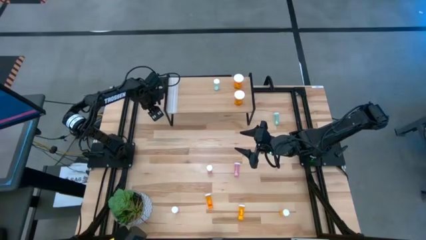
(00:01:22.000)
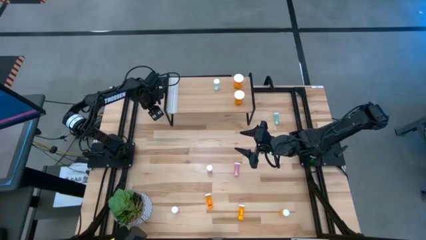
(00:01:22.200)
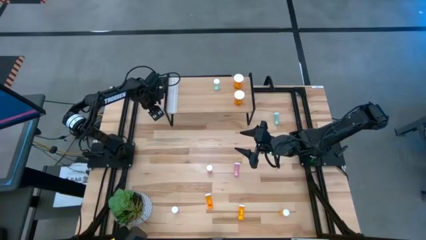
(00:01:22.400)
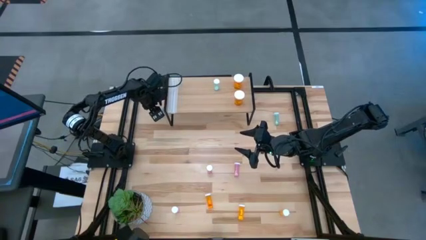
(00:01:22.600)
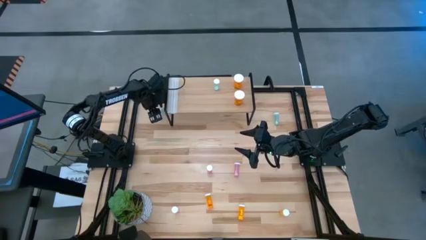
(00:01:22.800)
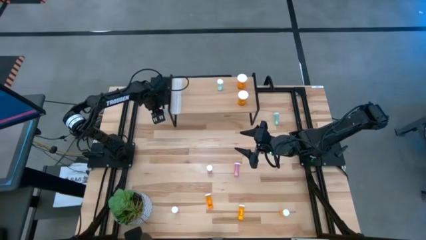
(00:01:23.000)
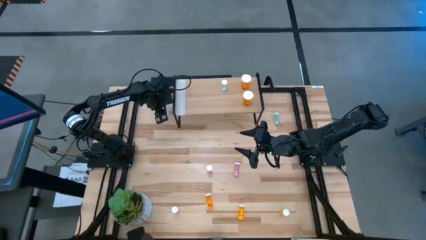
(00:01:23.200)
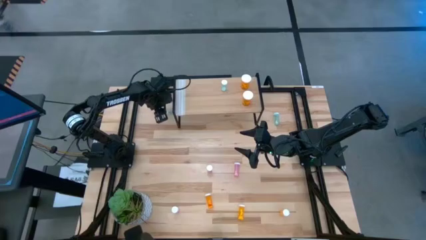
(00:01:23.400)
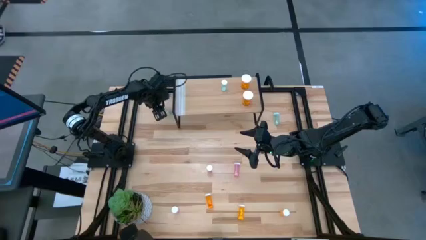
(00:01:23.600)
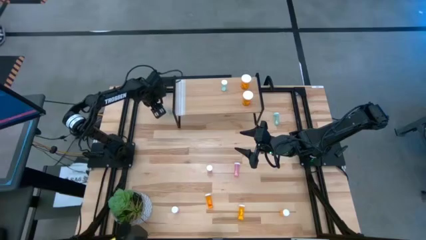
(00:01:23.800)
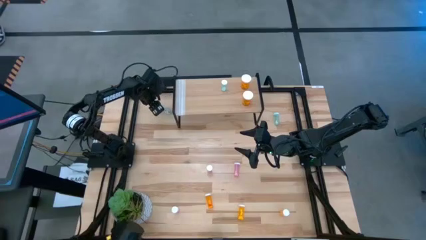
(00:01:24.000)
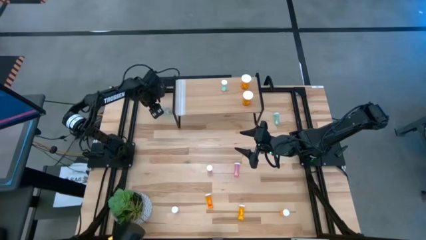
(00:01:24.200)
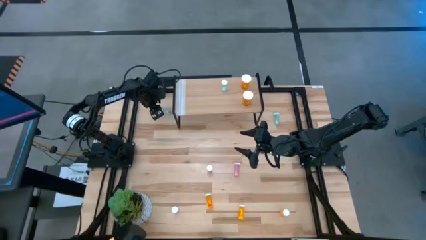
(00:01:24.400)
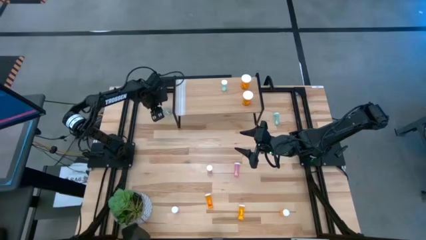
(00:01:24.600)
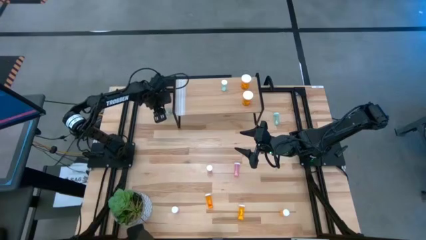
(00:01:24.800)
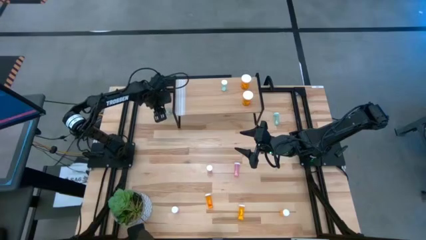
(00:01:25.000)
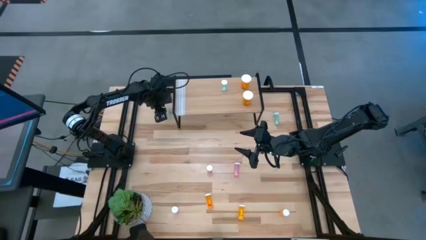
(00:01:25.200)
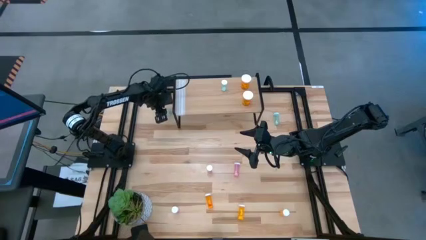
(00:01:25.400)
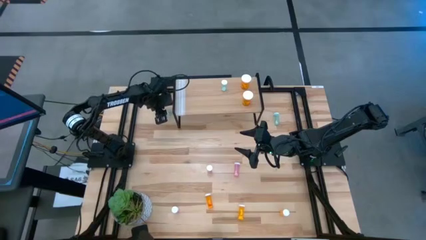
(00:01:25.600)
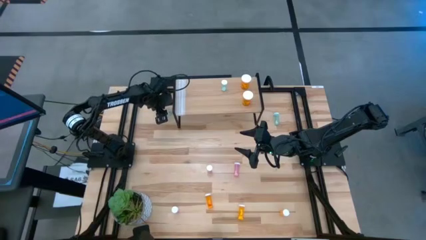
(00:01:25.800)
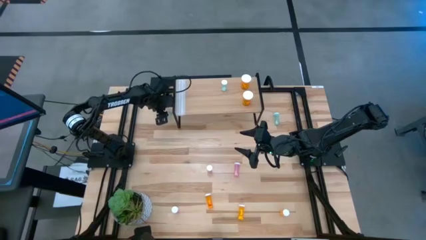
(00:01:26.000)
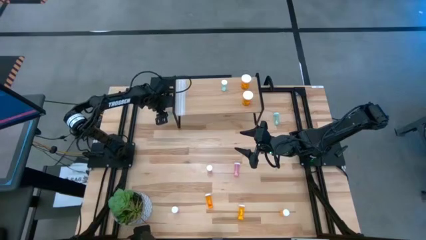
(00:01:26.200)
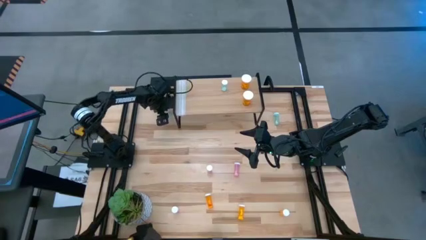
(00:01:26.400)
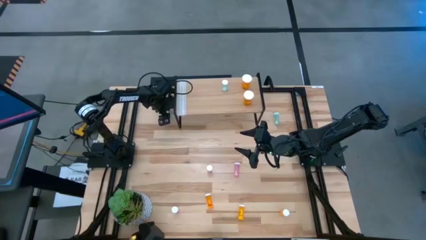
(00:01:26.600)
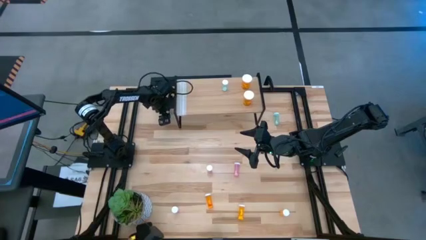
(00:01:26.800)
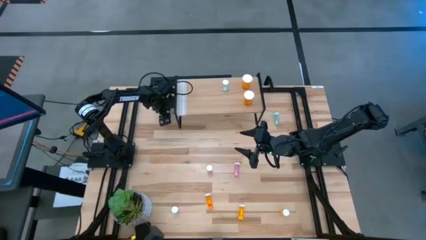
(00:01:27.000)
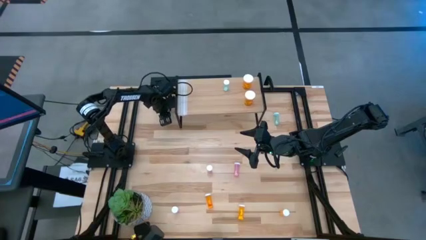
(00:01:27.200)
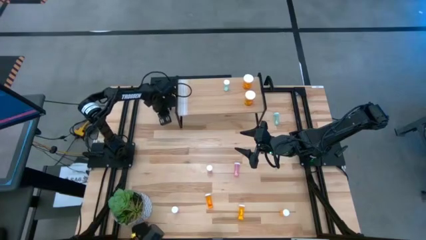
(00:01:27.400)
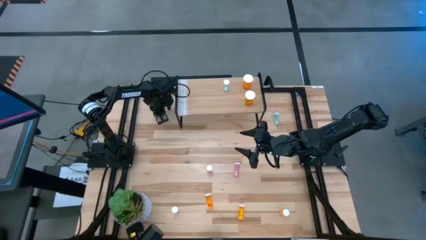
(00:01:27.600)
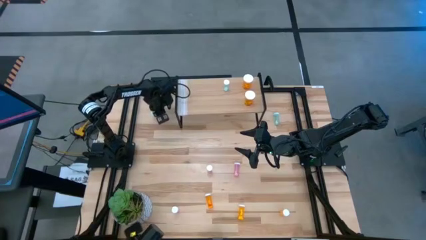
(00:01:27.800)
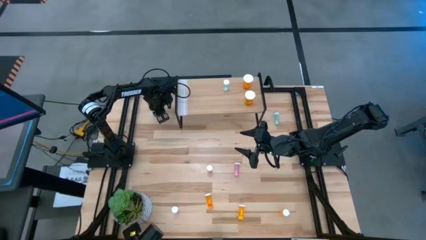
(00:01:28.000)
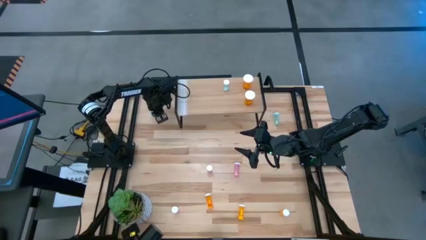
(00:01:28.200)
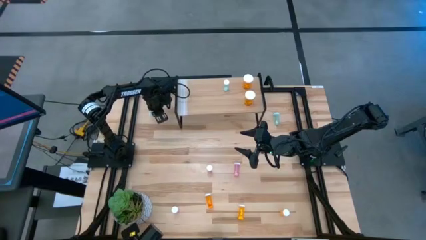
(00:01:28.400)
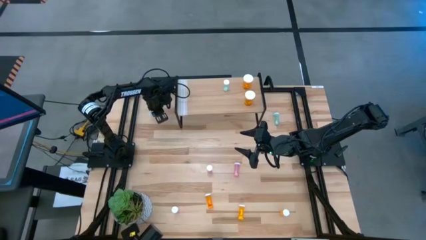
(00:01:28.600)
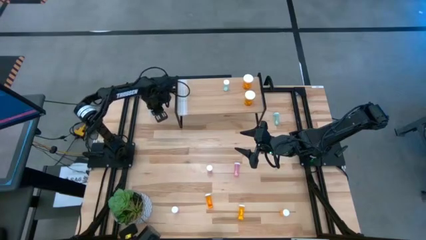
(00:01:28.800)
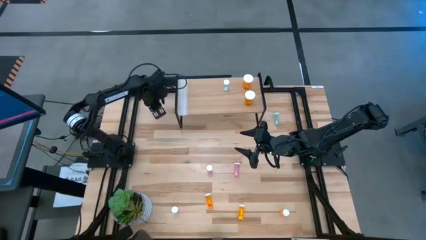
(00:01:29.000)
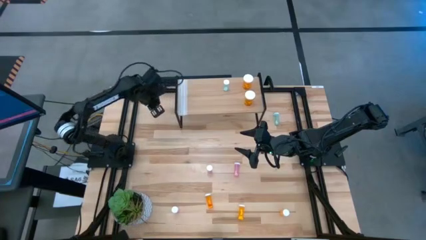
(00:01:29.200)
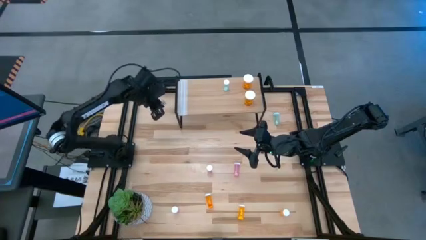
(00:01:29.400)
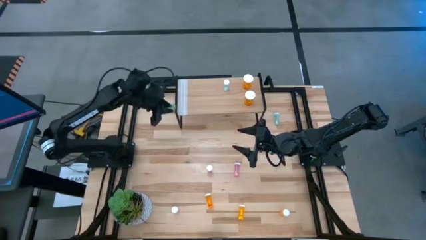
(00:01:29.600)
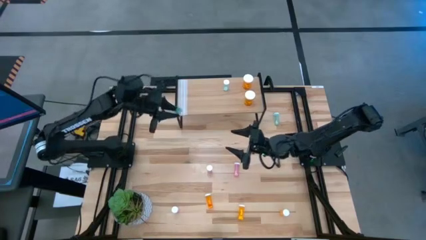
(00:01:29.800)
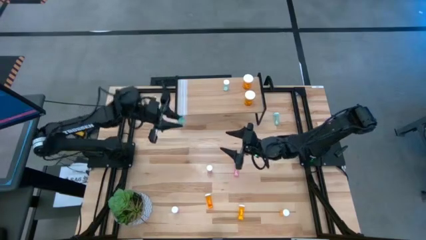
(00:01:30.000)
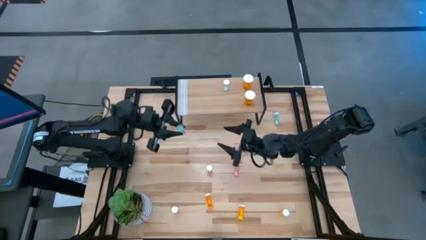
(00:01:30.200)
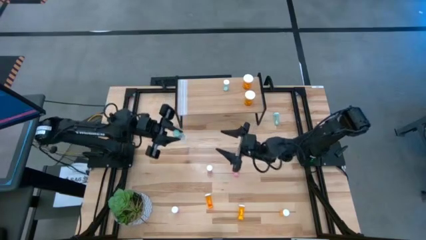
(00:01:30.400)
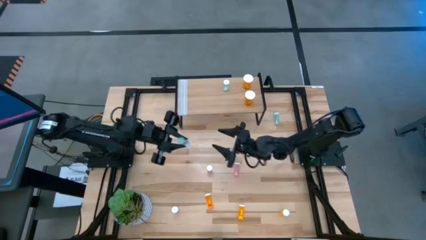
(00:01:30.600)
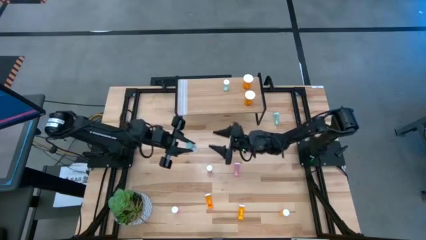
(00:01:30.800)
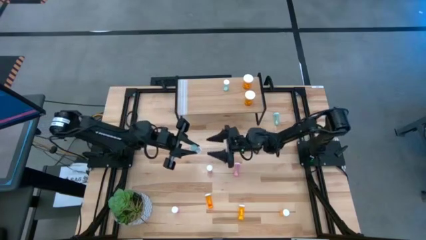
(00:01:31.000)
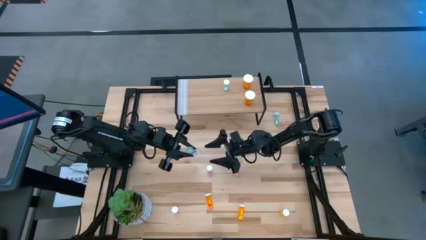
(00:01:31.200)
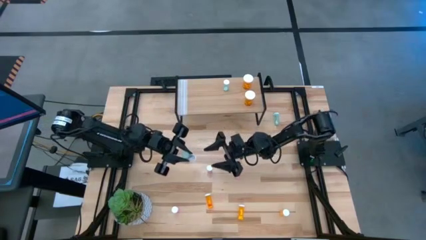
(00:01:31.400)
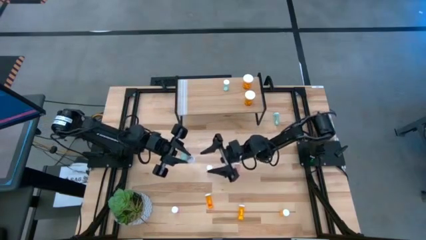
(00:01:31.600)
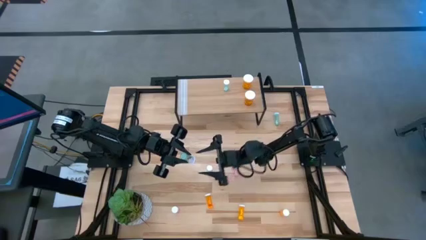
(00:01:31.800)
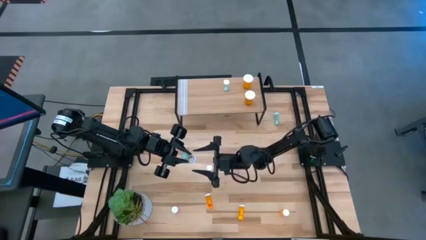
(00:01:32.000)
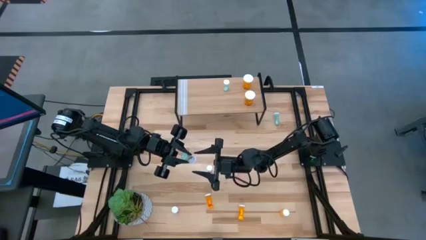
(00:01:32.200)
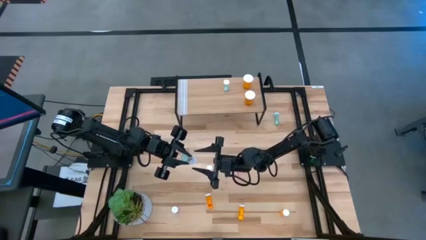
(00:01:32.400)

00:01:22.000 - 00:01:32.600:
Task: Pick and place medicine bottles onto shelf by color
Put the left small blue pill bottle on the shelf aligned with the other small blue pill bottle

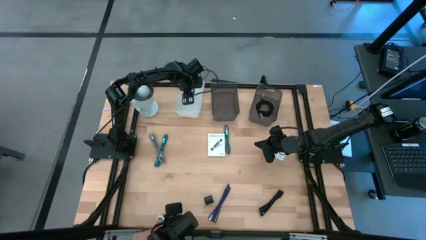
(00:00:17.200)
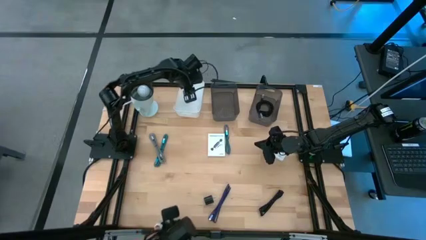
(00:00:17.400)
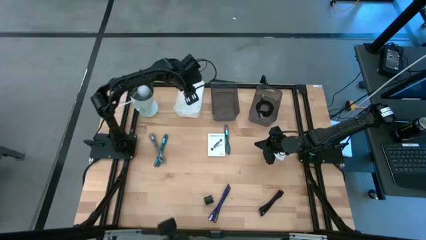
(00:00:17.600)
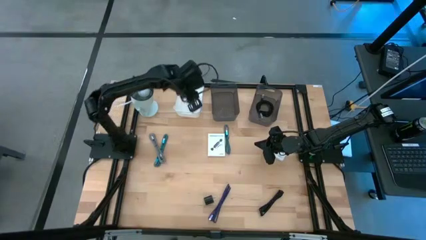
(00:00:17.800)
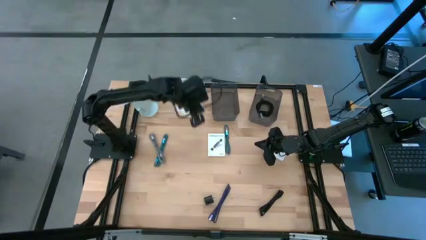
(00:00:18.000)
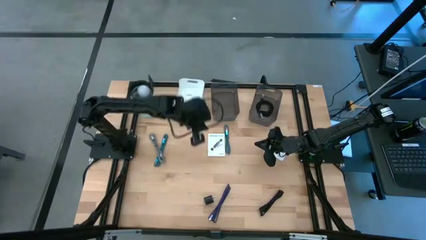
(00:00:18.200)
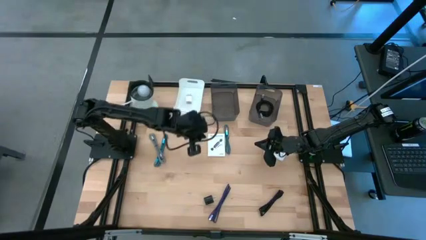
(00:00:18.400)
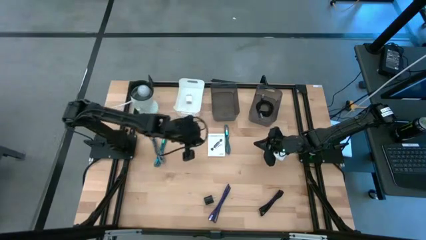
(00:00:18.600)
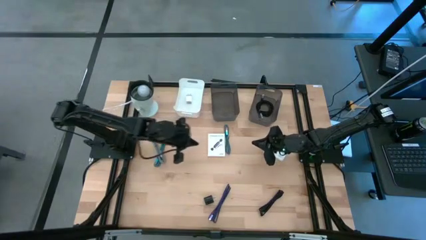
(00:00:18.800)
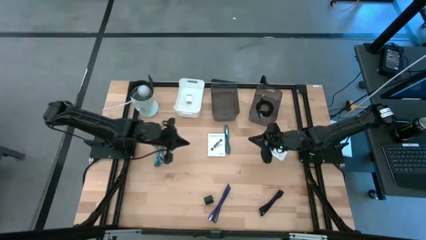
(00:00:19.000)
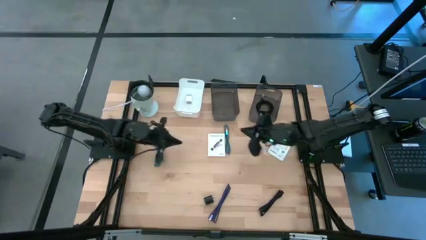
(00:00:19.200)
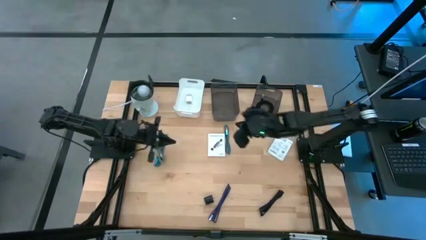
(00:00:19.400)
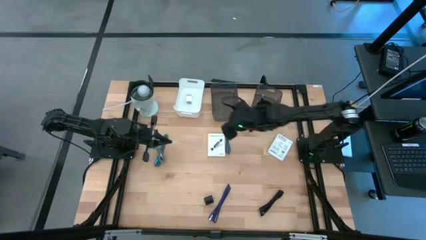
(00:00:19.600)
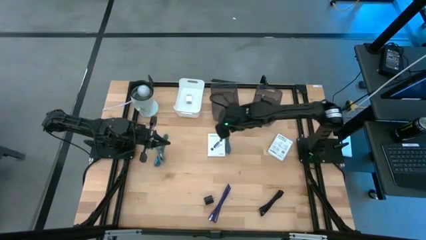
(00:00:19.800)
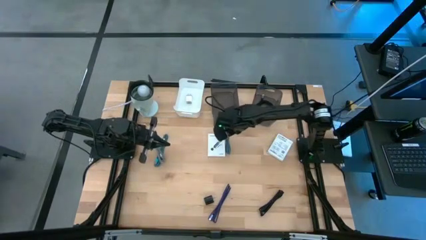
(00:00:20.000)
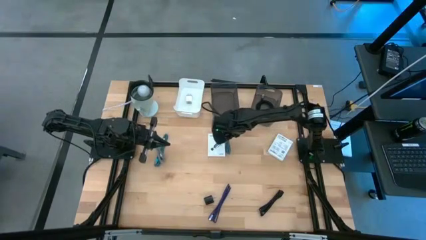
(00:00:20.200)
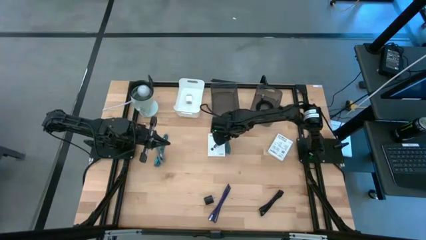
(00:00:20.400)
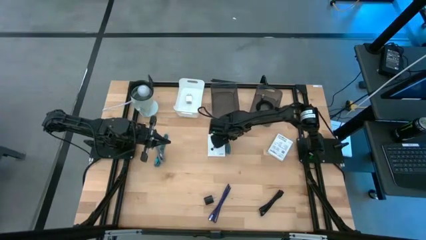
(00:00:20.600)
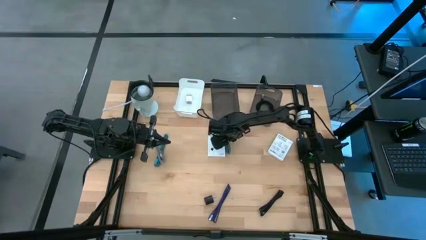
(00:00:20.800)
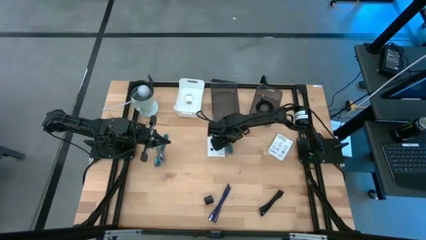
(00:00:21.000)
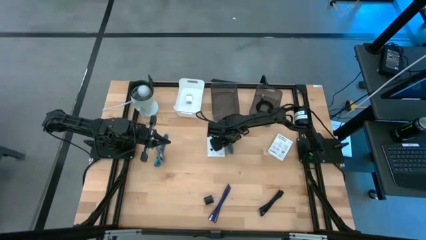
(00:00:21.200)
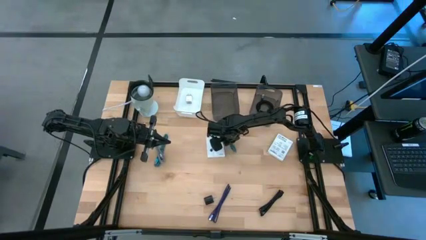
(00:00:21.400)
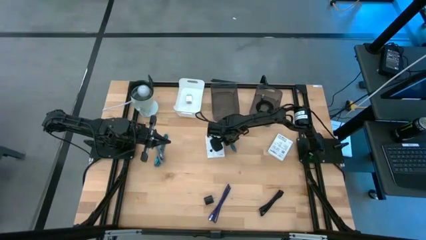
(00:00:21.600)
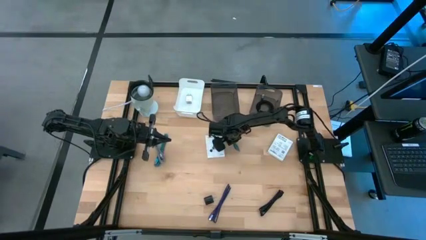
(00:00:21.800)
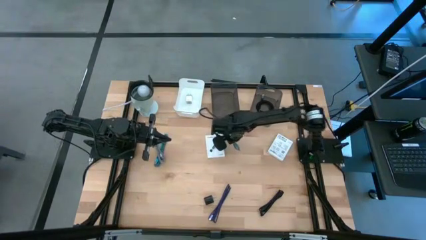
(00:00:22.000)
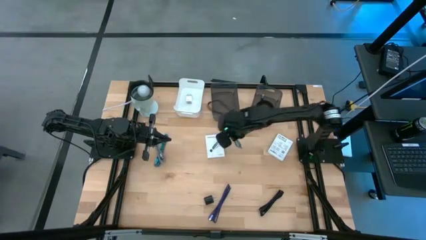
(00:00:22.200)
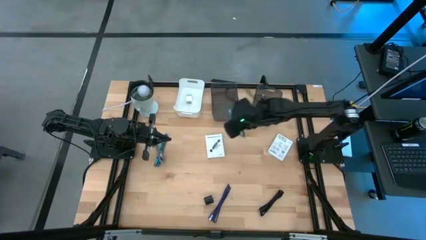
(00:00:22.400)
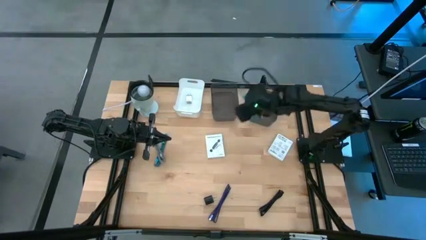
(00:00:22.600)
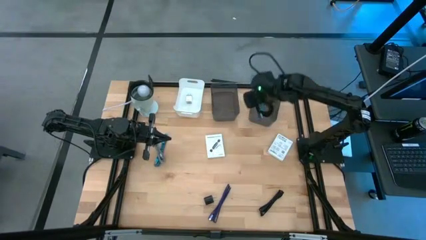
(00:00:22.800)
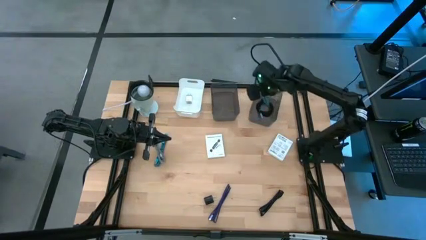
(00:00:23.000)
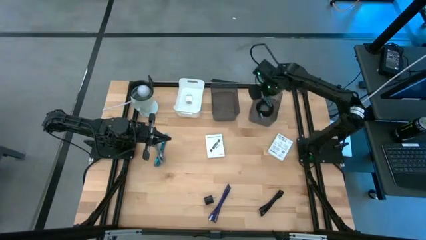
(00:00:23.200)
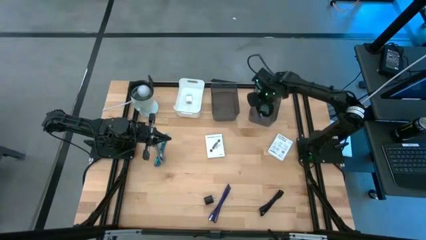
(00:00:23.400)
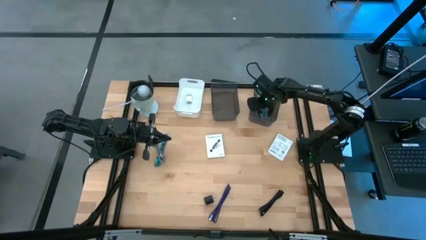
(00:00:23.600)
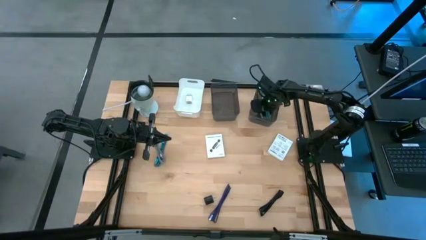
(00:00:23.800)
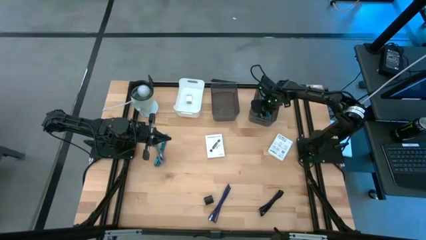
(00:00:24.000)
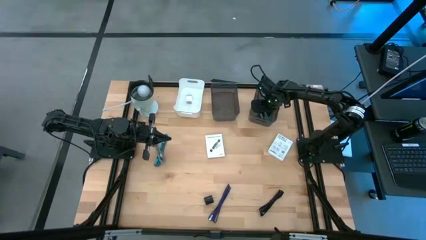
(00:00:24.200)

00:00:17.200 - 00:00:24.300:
Task: Pick and place items into bin
Put the right blue charger cable into the right black bin
